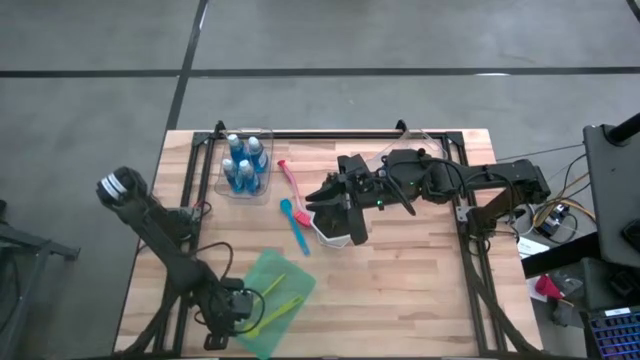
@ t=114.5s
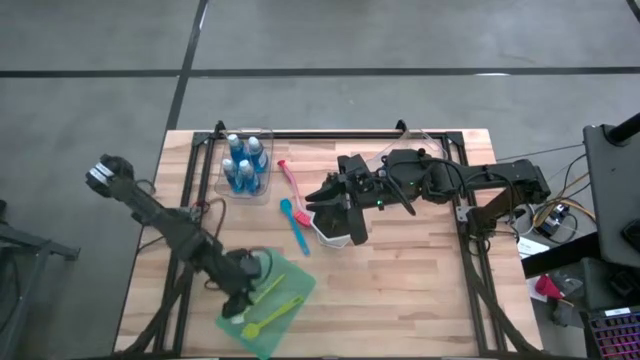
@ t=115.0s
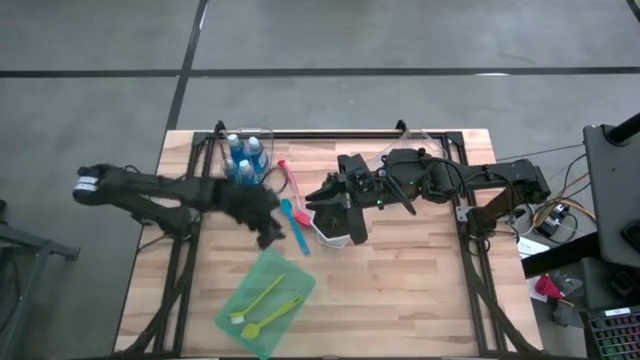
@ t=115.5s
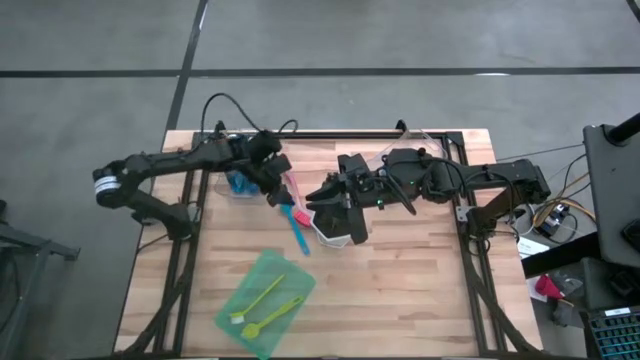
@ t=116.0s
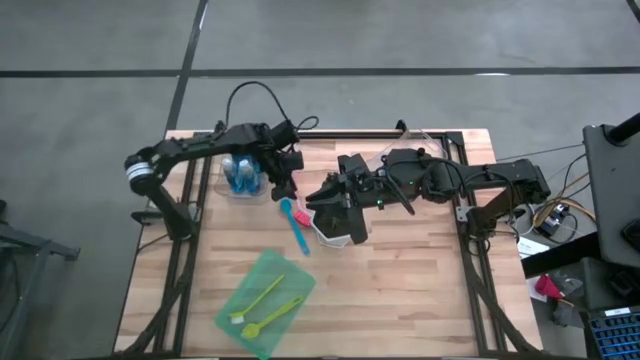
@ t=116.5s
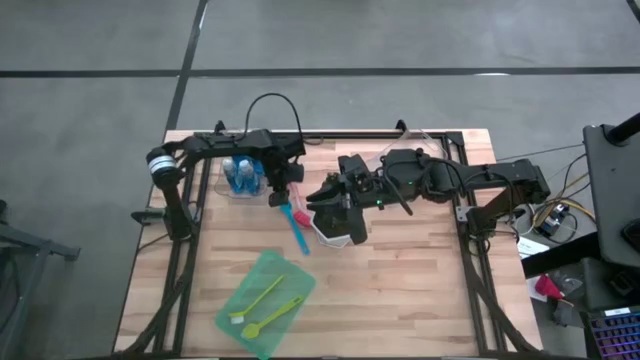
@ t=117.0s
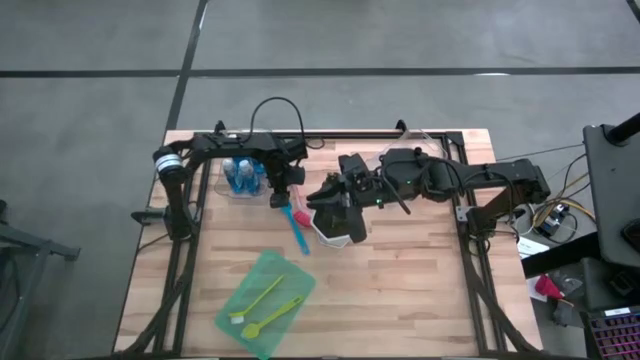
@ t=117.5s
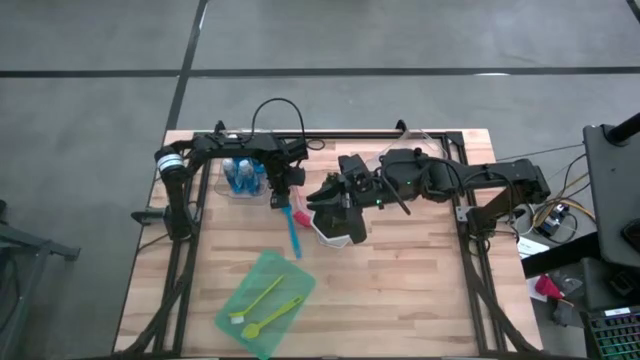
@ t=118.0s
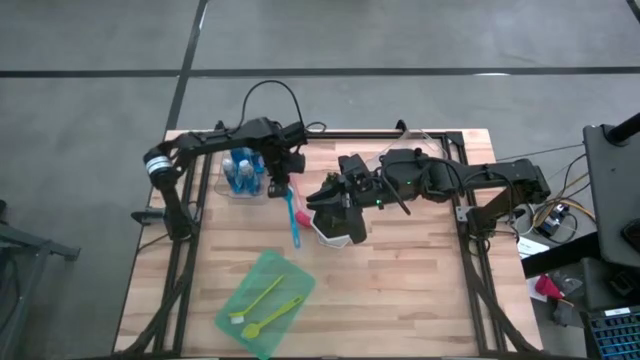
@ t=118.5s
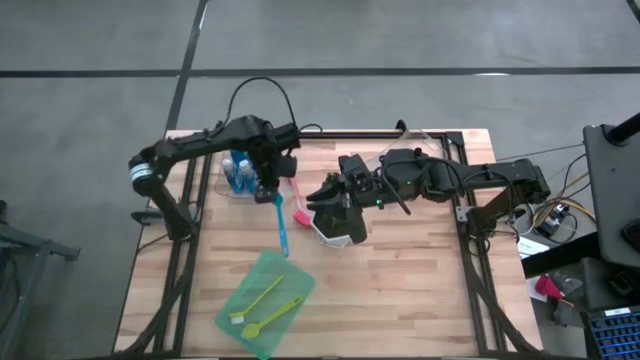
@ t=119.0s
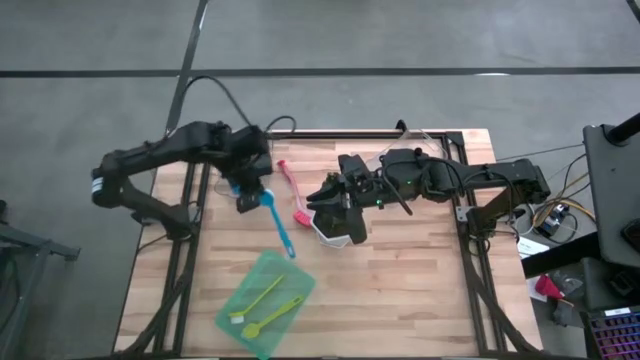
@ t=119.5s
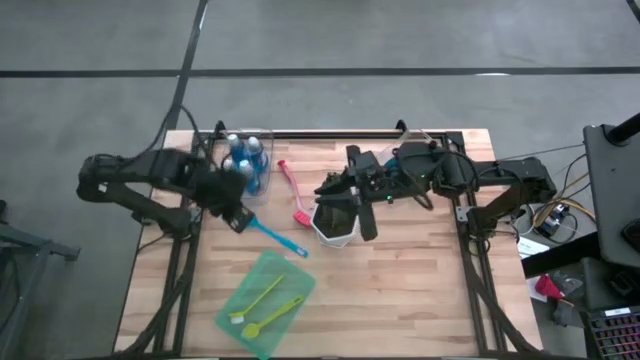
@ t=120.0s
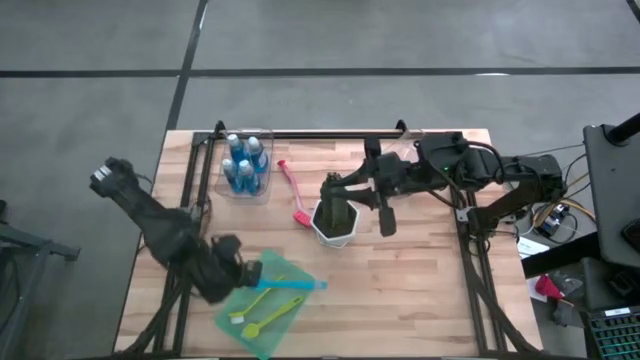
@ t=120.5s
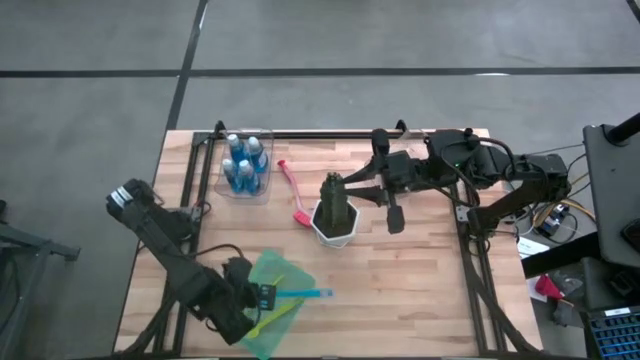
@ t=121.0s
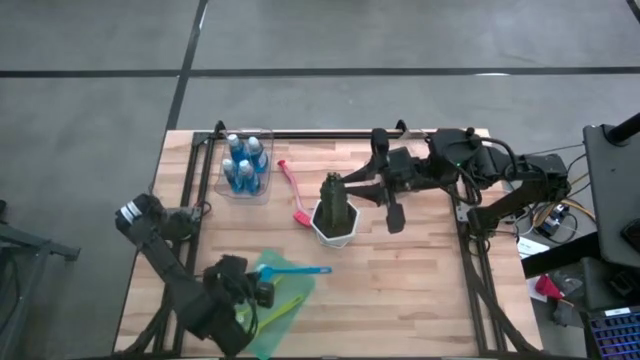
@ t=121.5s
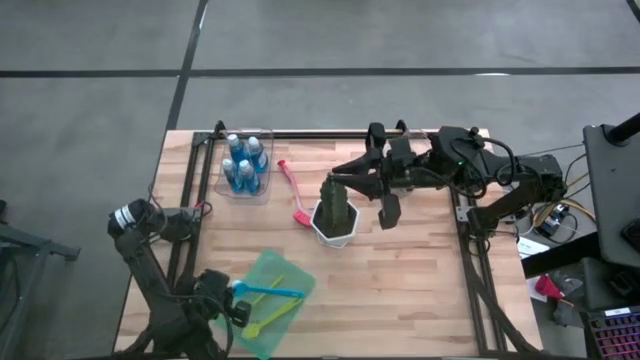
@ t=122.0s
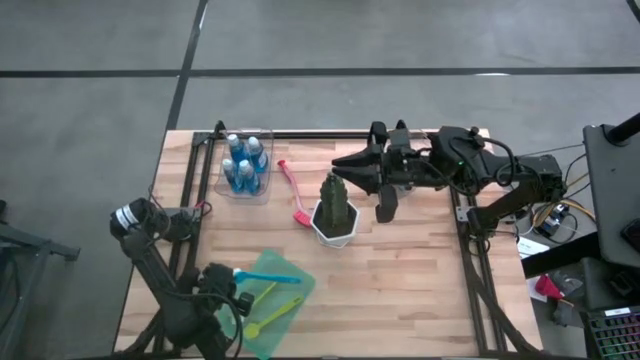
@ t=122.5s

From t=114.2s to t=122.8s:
Task: Pick & Place Kitchen Sink Supplies
Put the blue dish brush into the green bin

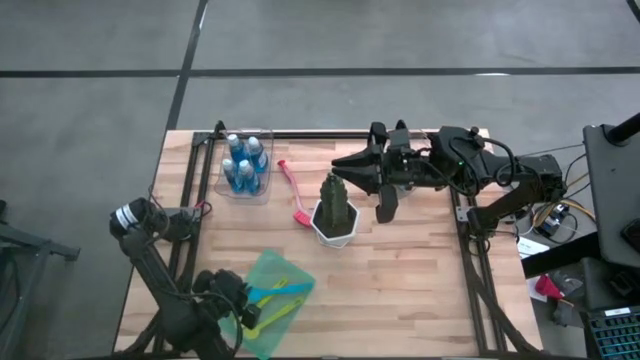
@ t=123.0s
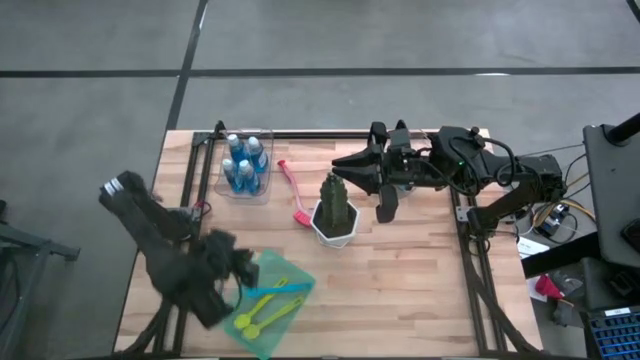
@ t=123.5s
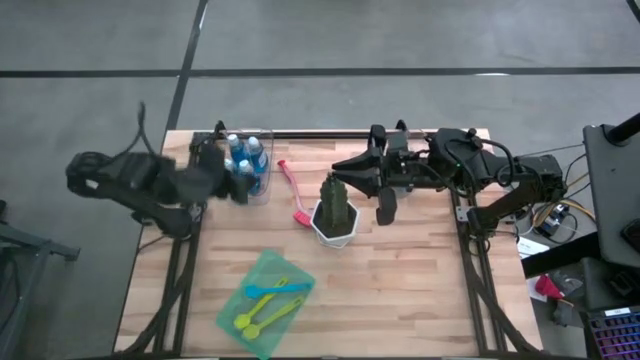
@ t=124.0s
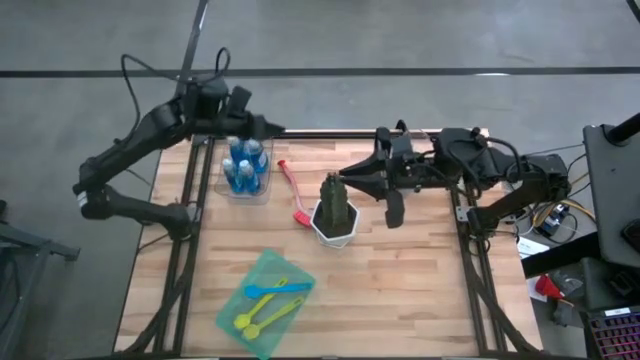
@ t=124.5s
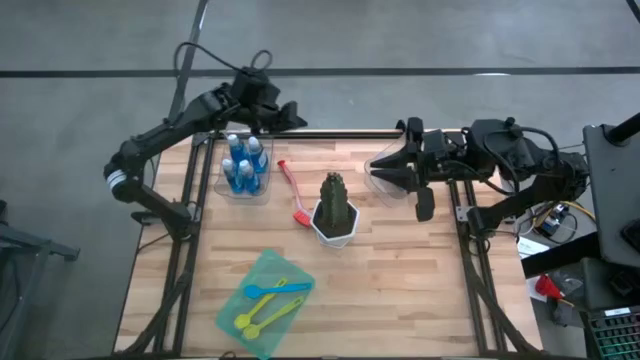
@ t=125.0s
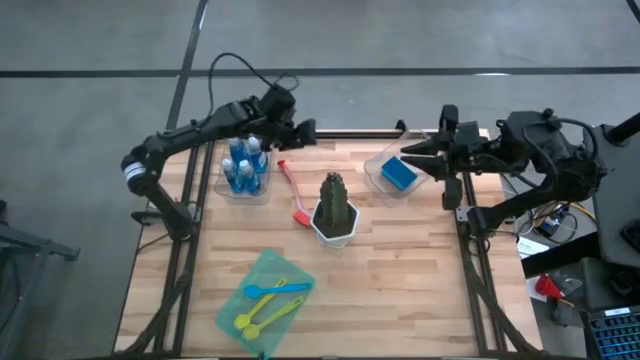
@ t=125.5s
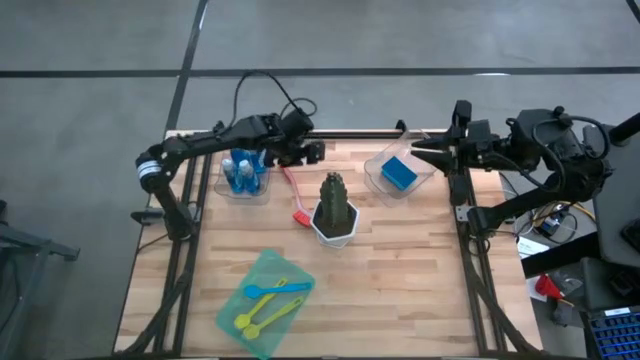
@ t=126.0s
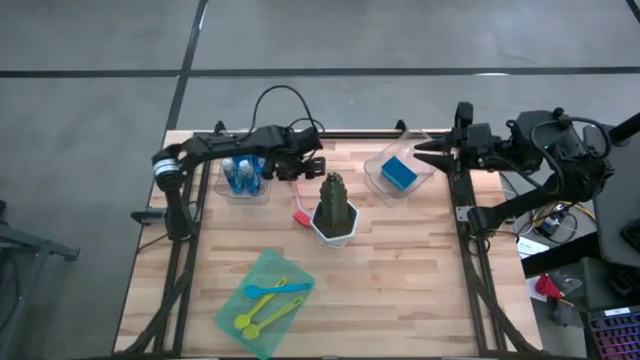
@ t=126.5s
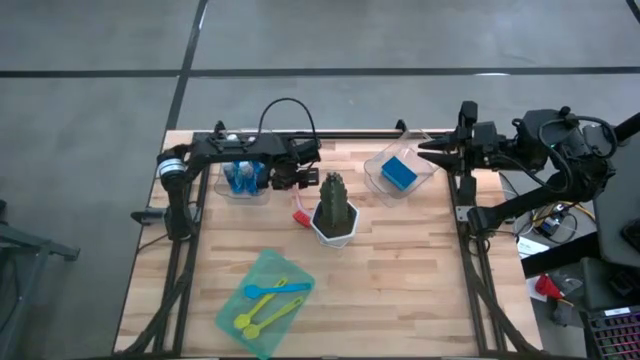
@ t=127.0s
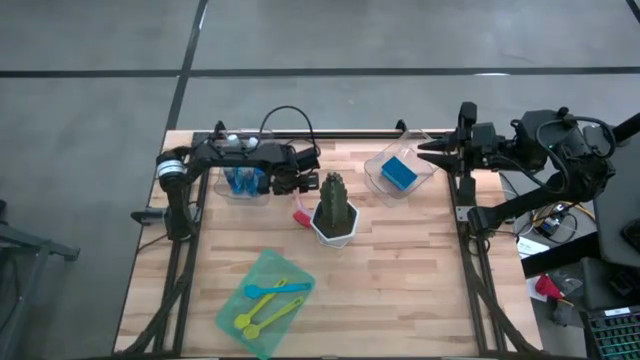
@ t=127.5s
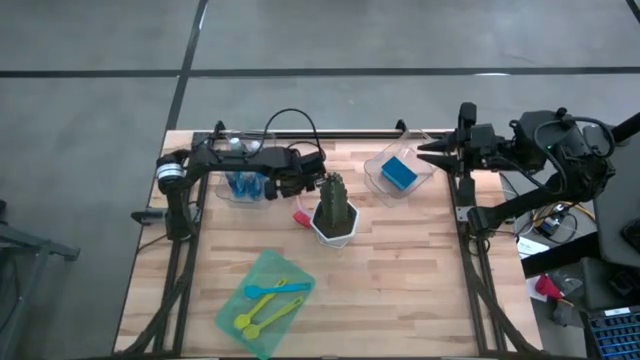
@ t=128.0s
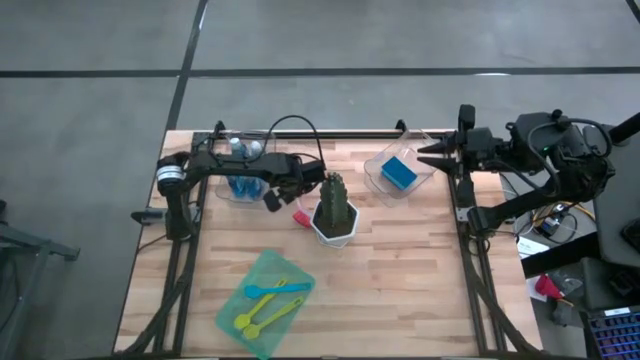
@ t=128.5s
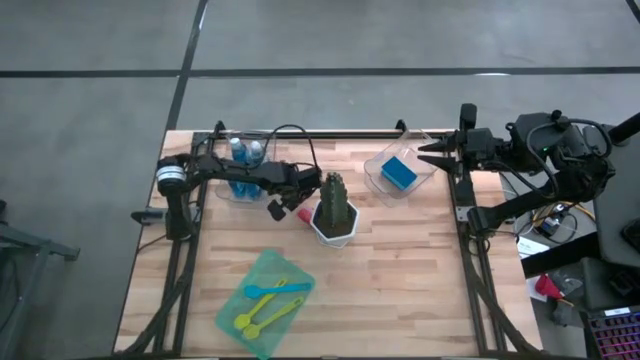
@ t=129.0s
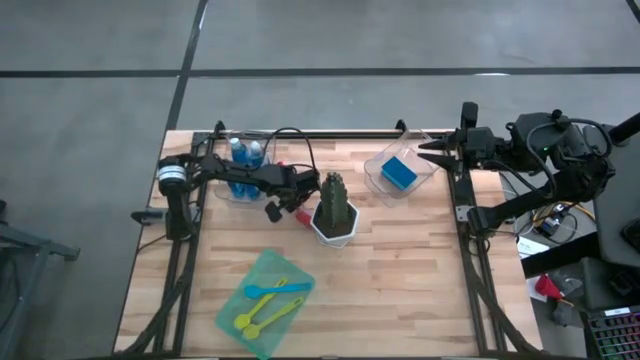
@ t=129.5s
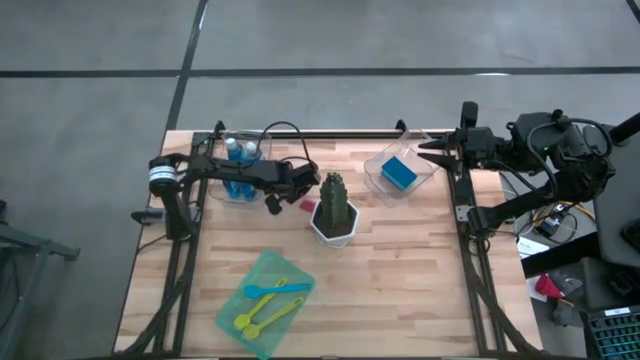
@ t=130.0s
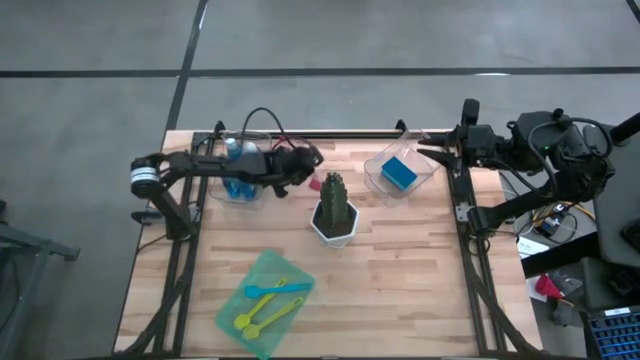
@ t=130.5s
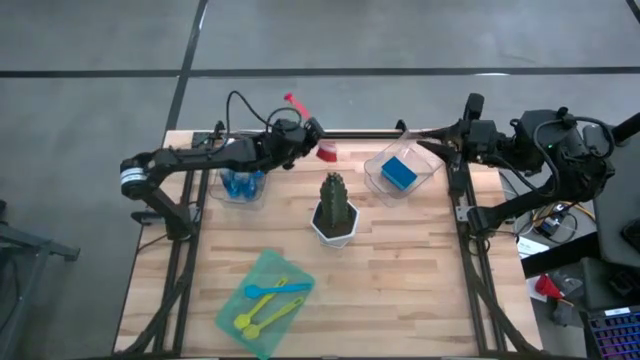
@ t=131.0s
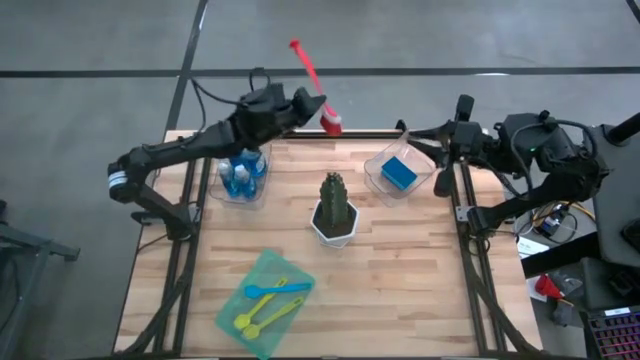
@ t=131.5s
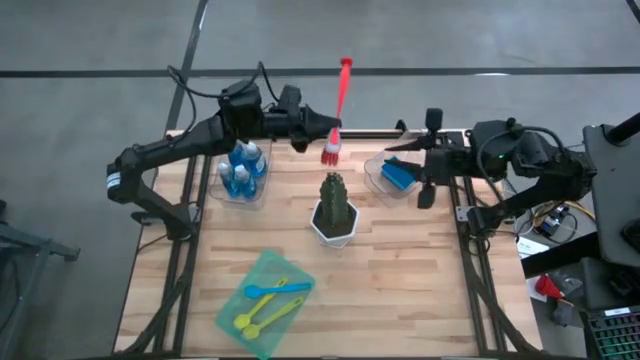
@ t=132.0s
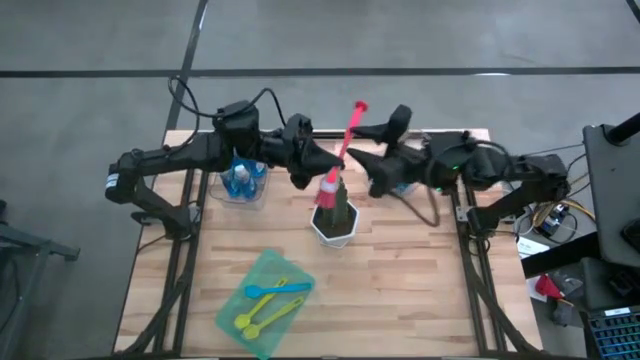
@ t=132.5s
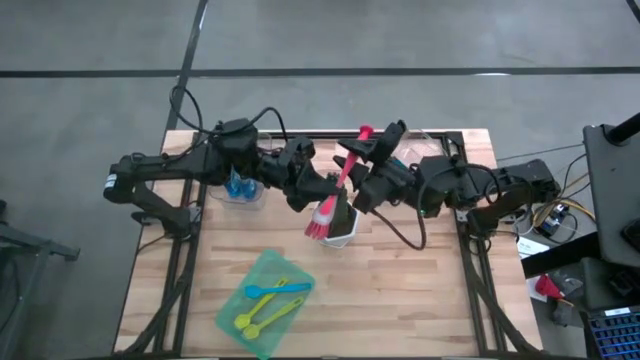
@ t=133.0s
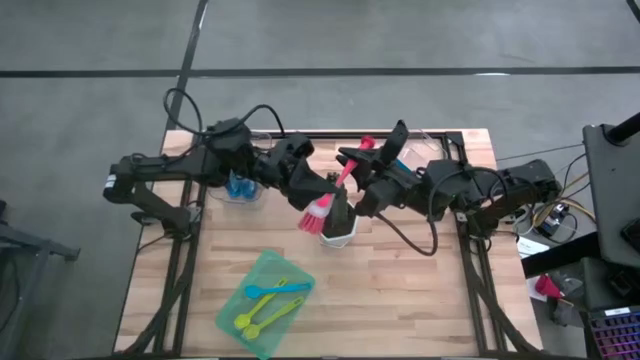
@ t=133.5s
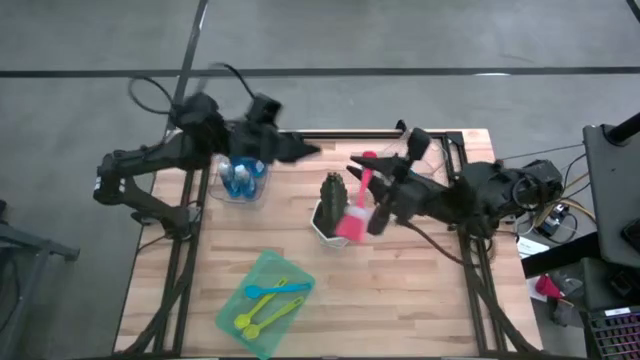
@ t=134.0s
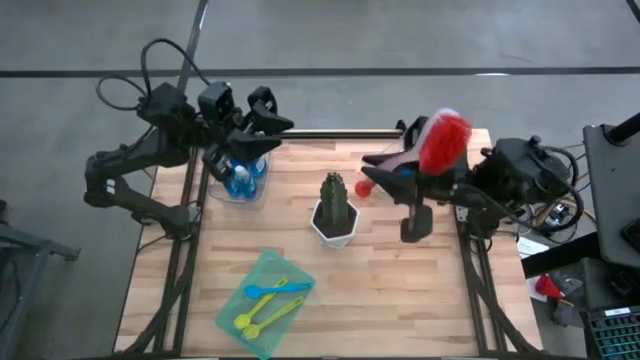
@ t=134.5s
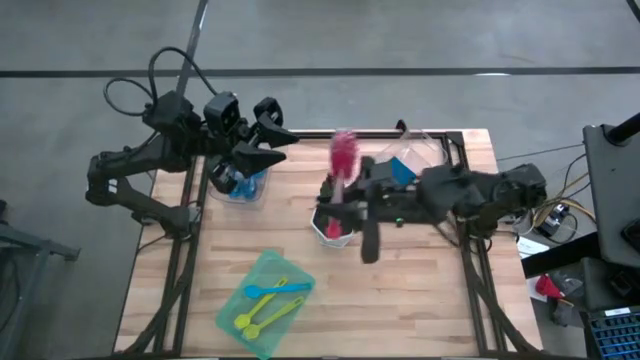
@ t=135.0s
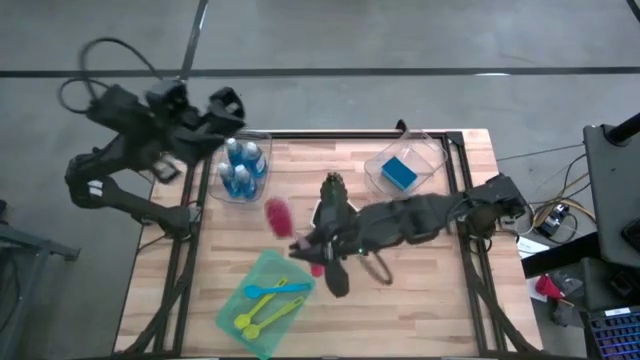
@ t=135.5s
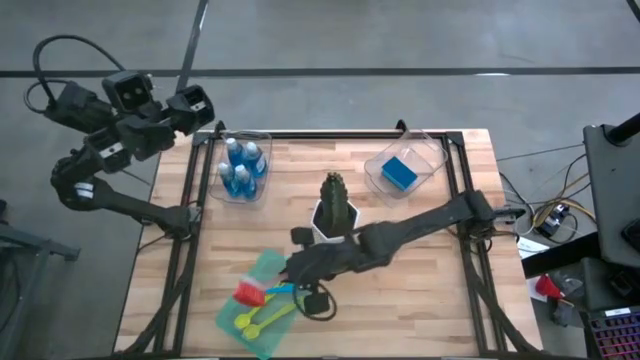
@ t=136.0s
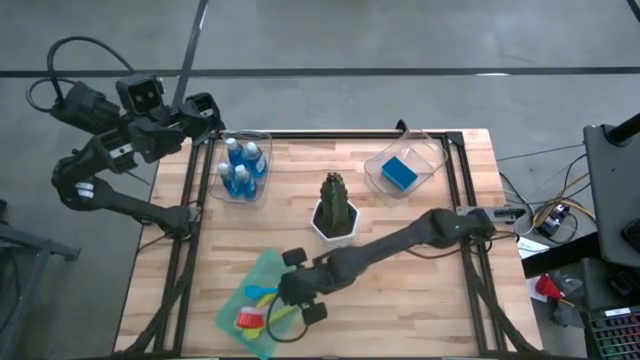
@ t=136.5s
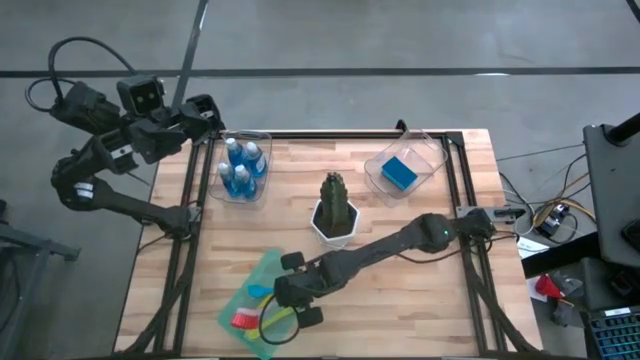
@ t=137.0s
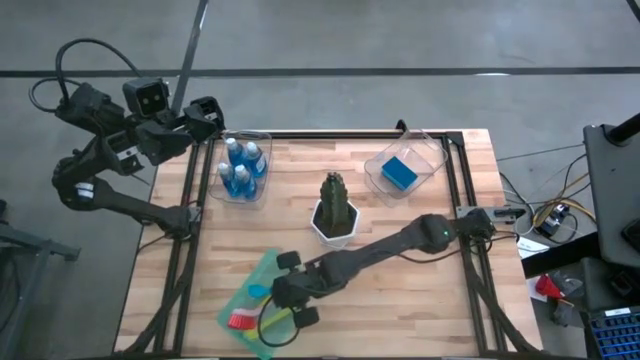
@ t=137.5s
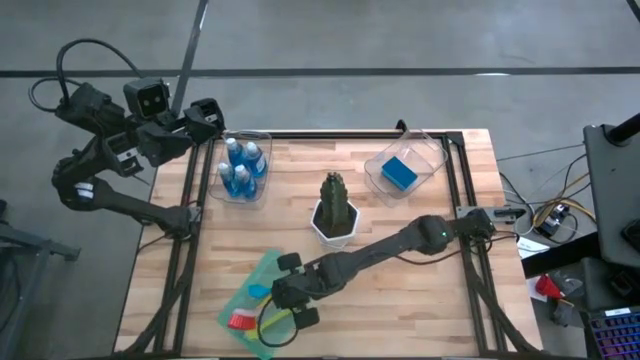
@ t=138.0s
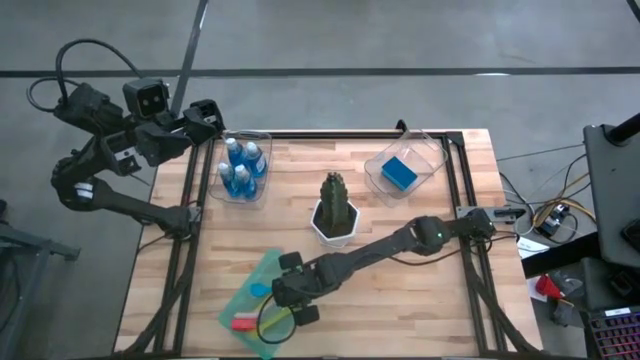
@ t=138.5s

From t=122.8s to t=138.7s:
Put the orange dish brush into the green bin
